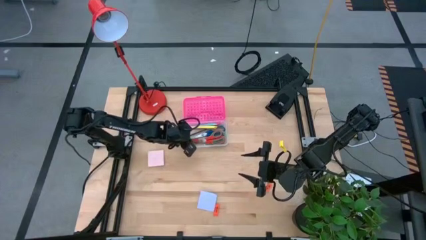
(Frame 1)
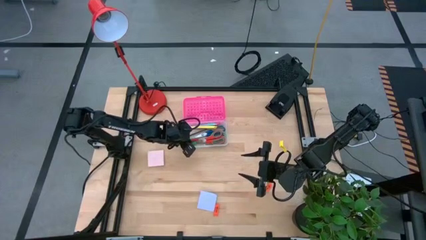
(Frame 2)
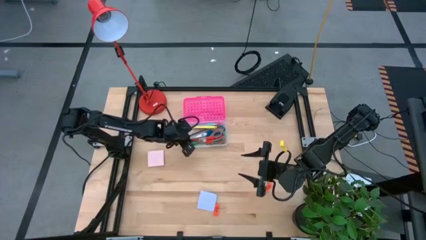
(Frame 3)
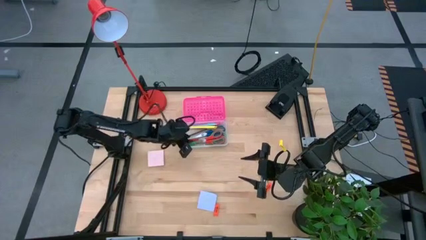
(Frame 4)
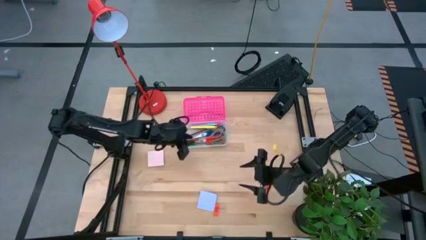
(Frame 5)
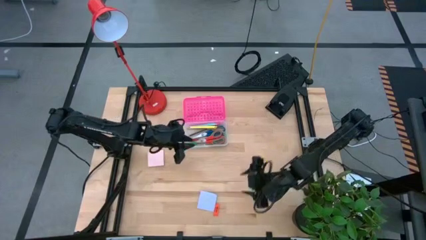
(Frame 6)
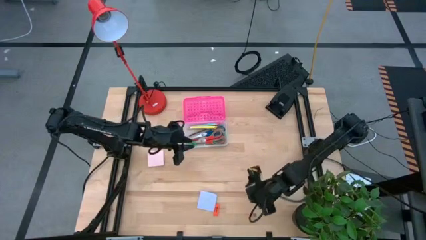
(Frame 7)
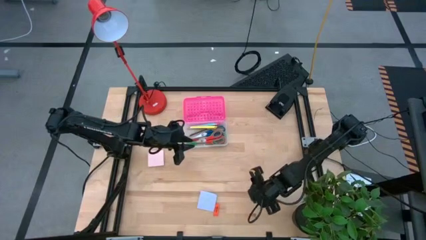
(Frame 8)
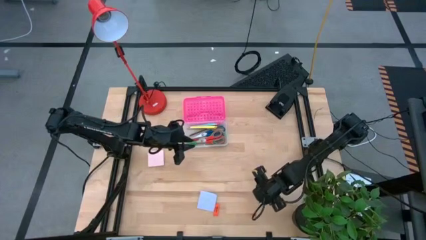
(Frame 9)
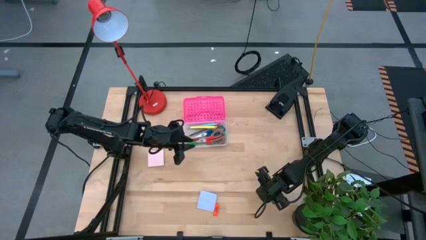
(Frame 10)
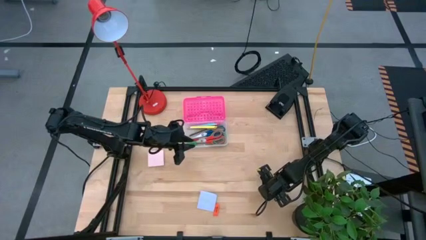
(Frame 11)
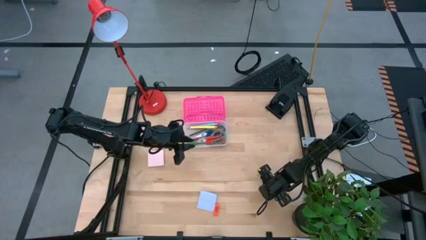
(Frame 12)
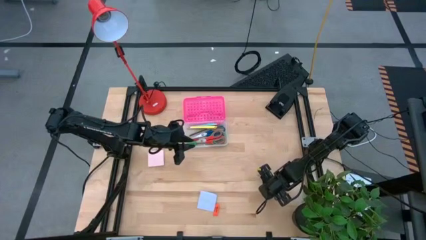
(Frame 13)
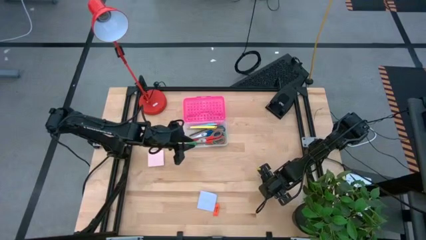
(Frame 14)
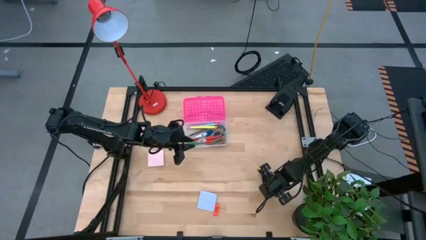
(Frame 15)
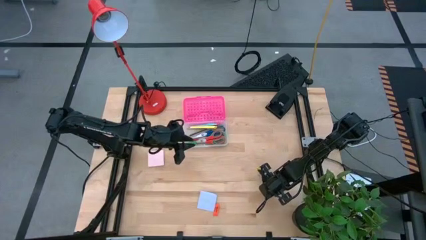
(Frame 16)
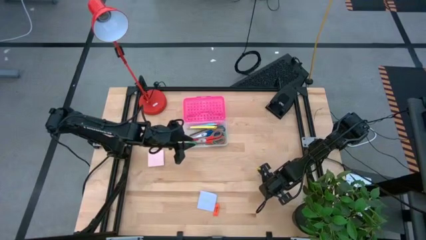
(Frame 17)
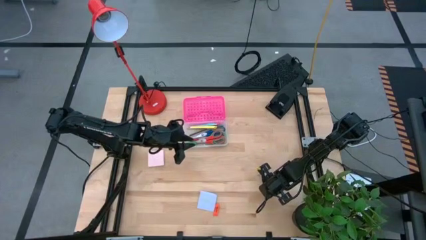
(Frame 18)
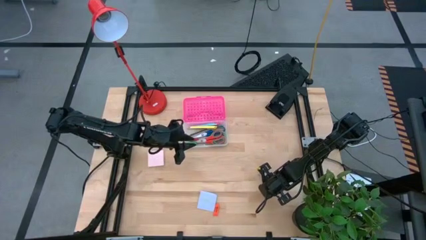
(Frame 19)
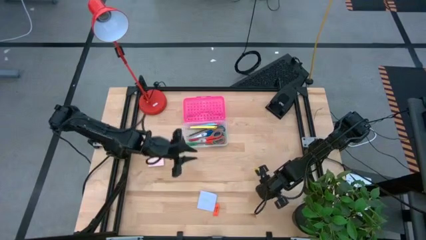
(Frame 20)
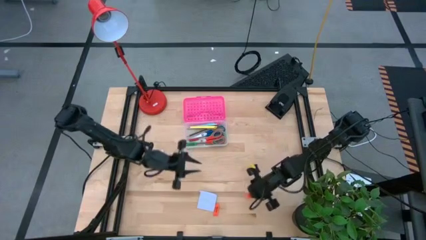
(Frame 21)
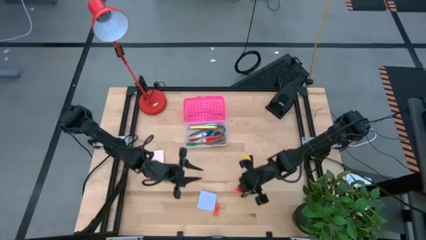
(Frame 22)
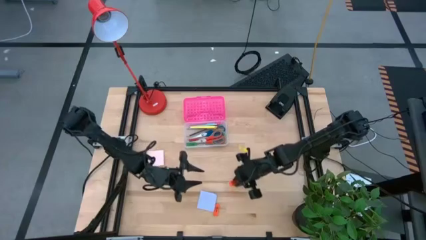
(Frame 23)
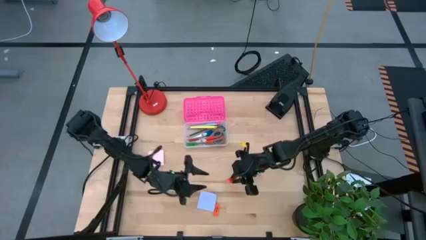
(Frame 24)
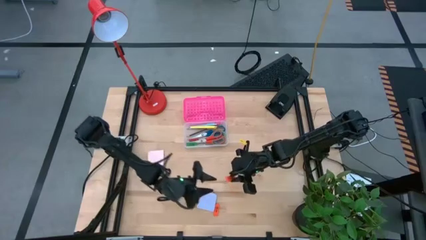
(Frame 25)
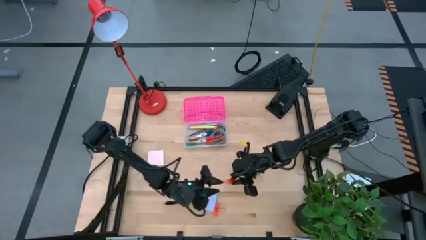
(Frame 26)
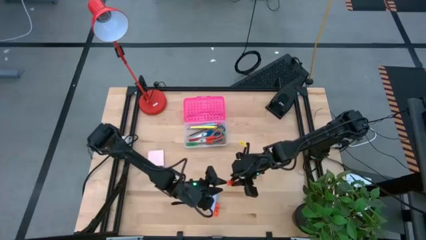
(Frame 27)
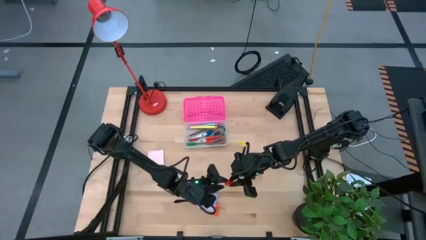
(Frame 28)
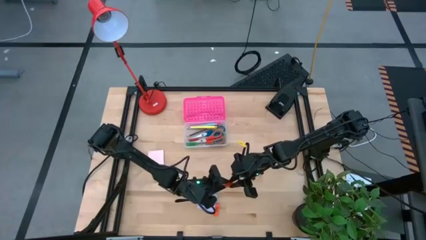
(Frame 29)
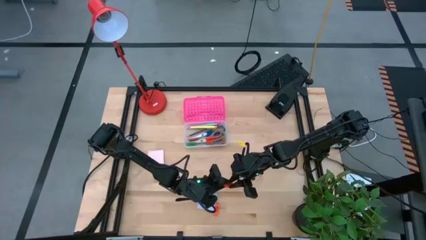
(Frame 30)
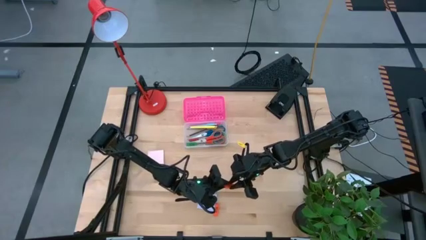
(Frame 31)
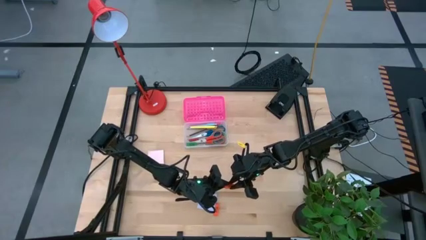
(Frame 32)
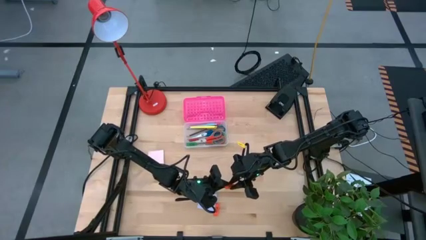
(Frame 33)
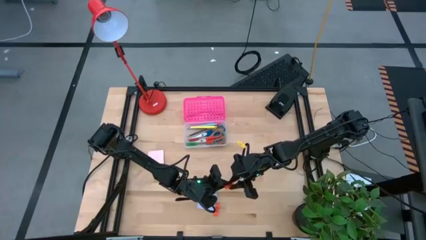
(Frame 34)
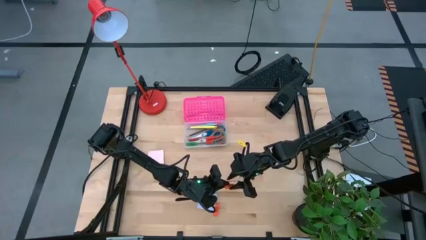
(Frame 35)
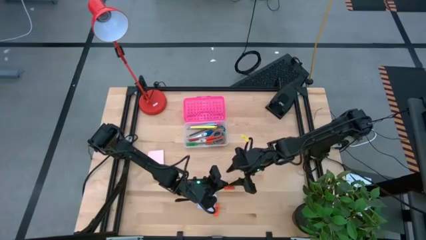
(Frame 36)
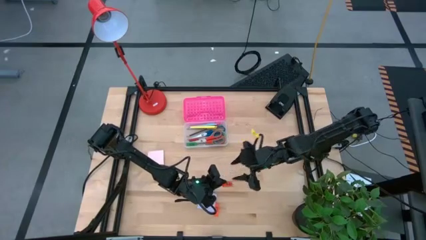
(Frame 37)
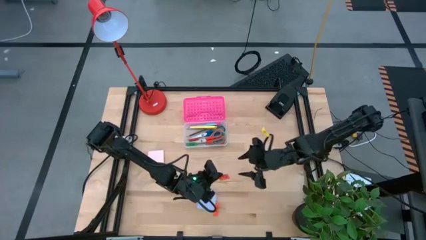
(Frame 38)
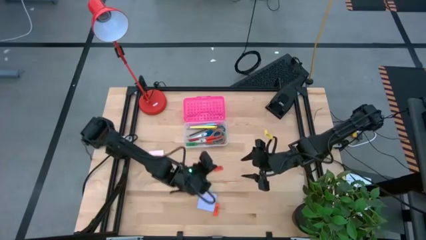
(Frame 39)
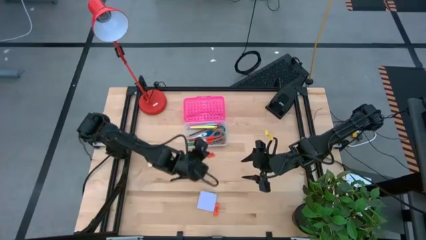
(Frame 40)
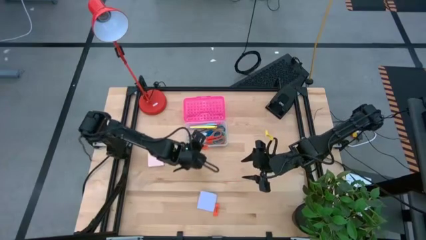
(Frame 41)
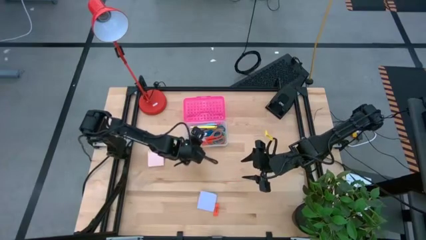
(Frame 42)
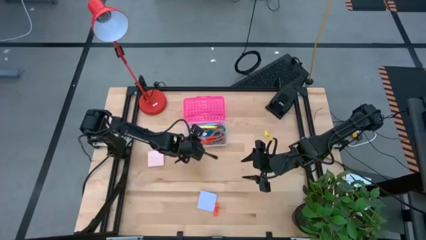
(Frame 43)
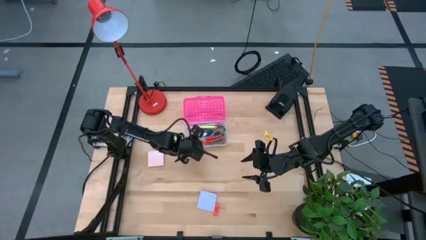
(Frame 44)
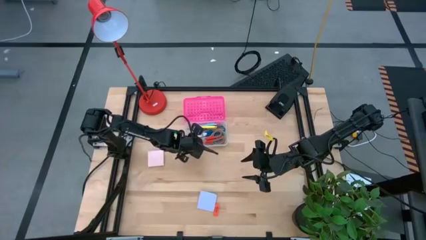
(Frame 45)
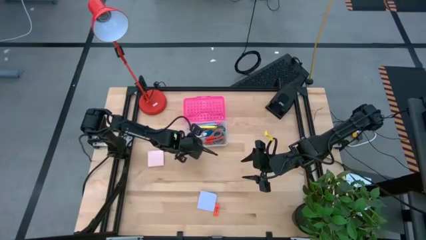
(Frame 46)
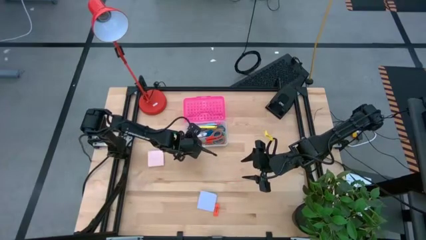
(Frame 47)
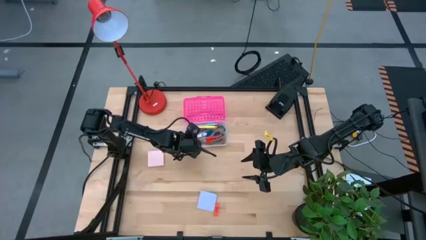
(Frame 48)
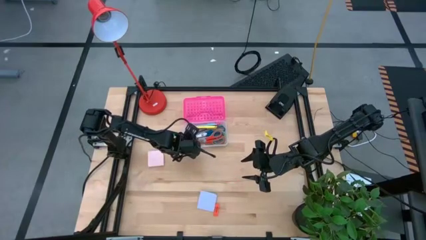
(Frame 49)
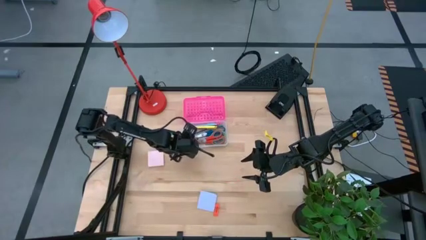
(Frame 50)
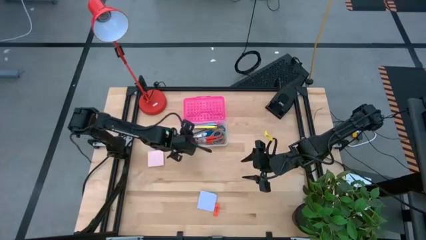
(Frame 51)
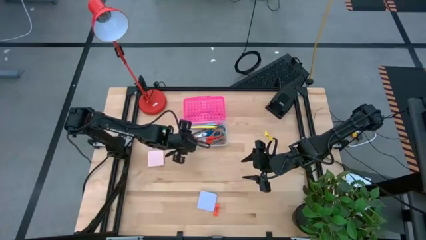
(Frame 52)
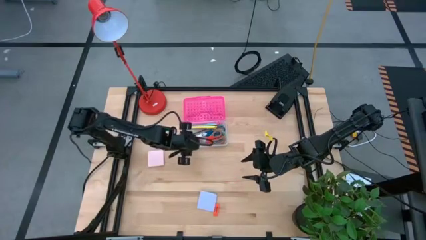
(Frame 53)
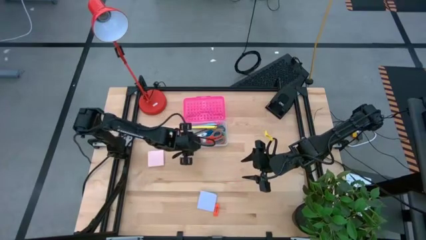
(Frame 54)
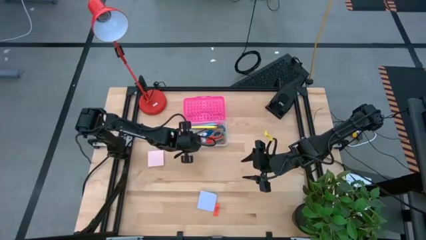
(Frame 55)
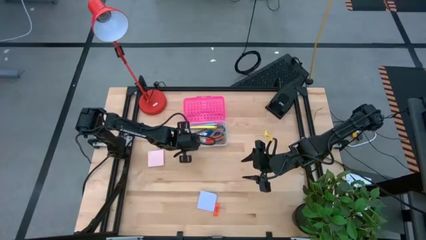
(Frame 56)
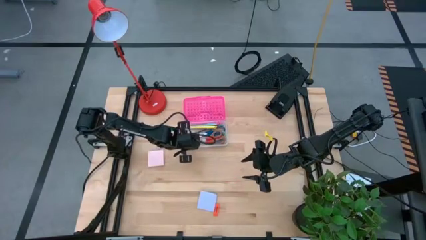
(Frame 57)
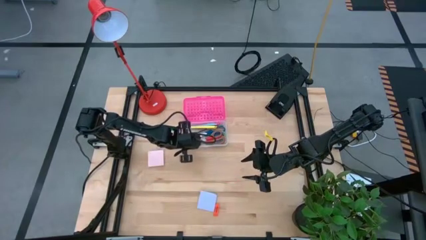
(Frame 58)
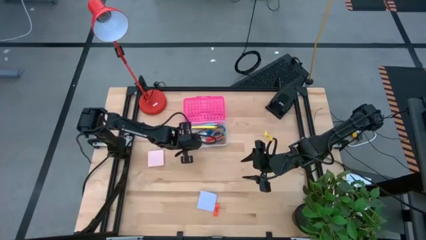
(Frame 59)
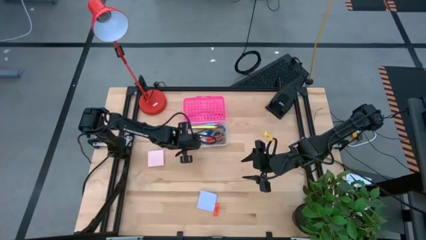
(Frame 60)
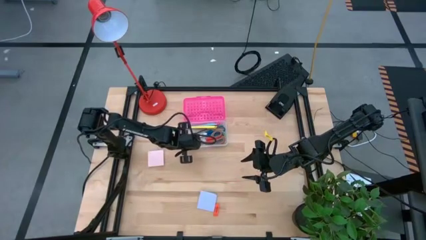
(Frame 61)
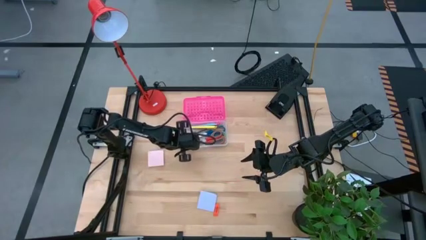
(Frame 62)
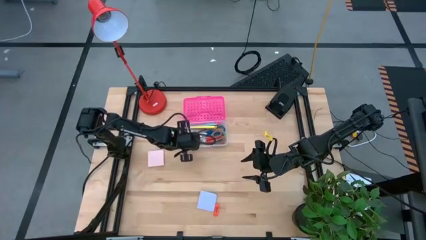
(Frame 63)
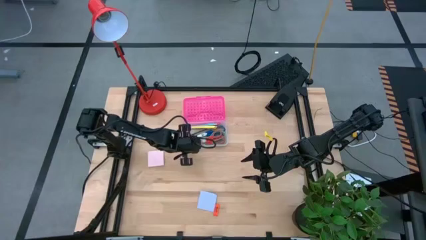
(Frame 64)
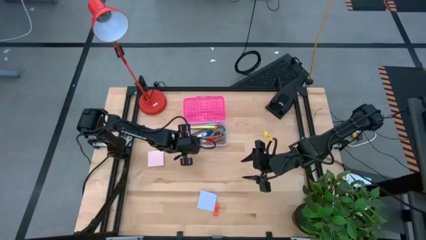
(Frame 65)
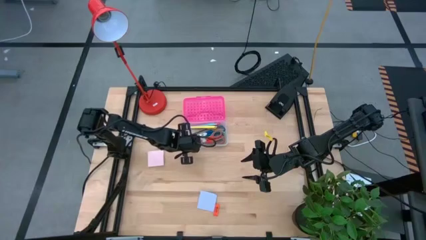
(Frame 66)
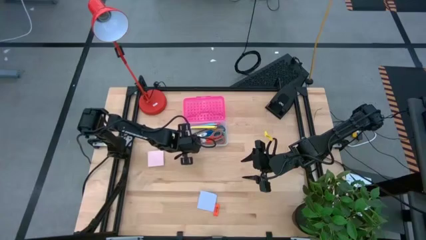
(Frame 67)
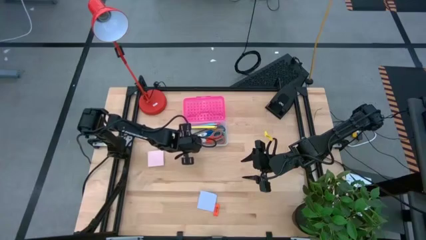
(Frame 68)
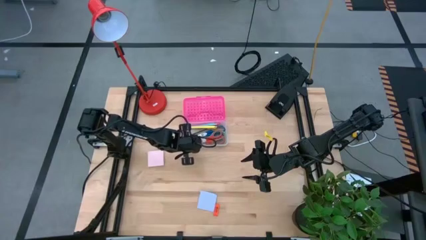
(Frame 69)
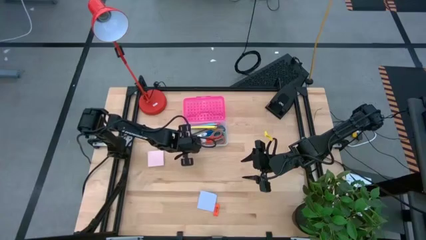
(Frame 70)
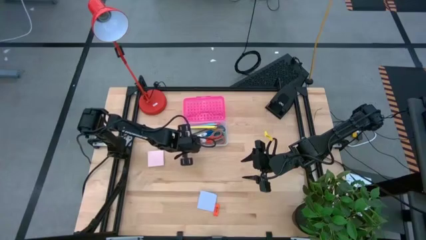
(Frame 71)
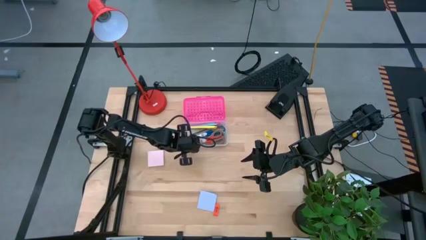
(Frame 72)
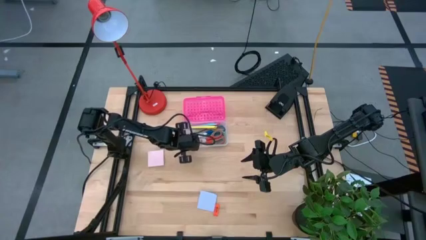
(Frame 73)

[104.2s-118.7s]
Task: Pack school essentials
Put the right orange eraser into the pink supply box
